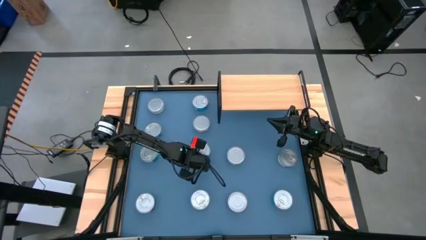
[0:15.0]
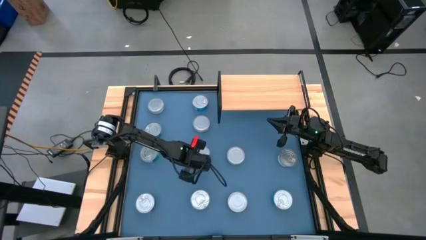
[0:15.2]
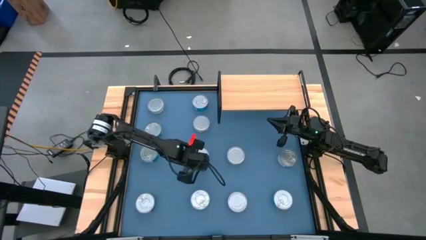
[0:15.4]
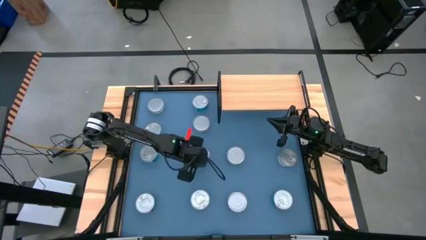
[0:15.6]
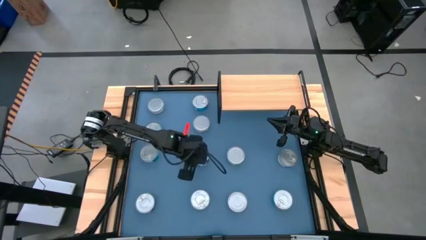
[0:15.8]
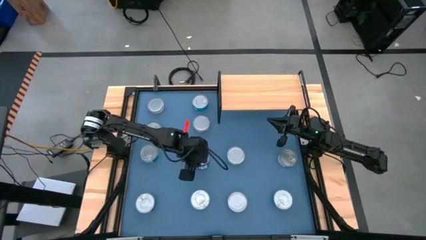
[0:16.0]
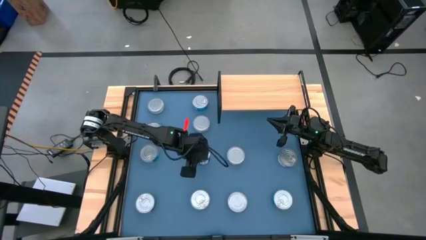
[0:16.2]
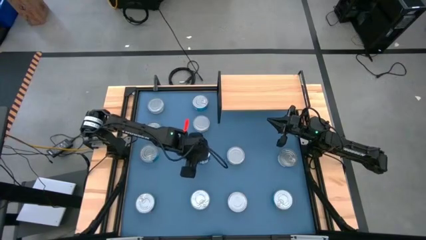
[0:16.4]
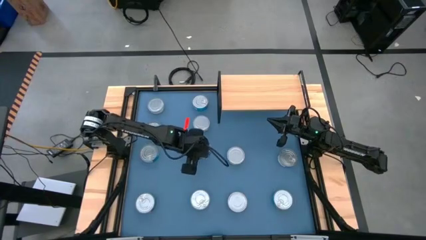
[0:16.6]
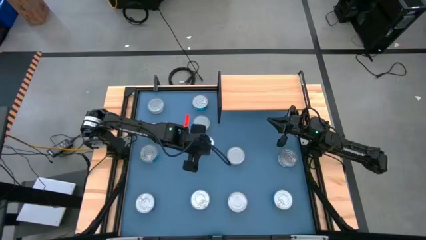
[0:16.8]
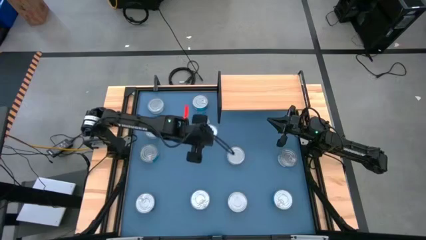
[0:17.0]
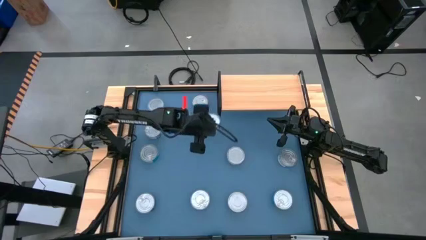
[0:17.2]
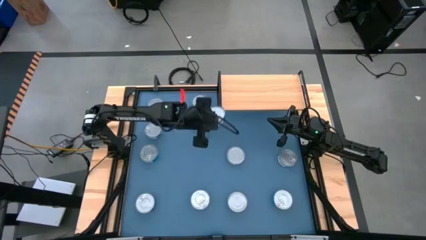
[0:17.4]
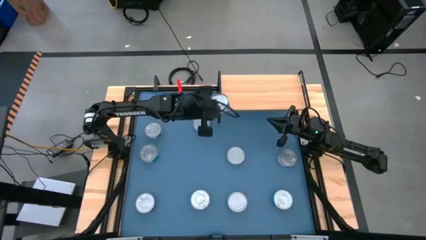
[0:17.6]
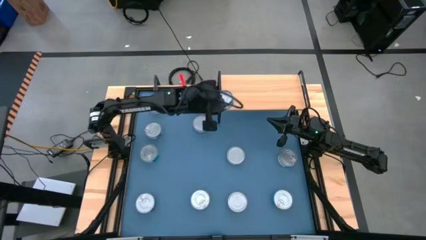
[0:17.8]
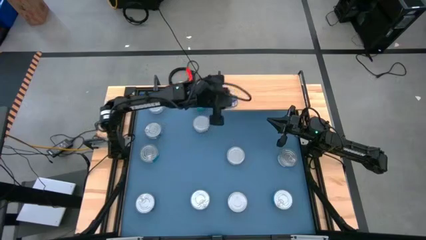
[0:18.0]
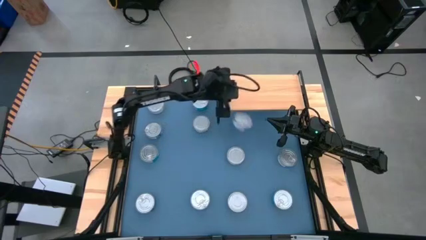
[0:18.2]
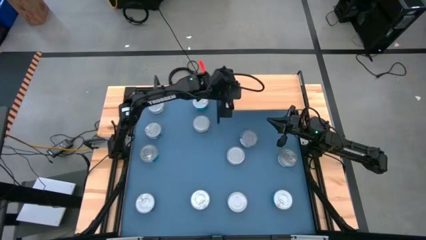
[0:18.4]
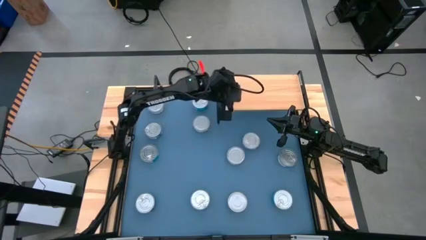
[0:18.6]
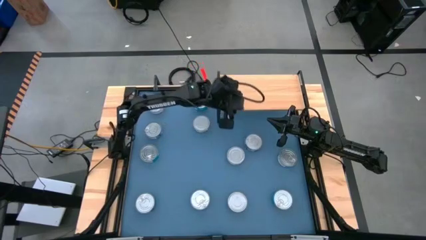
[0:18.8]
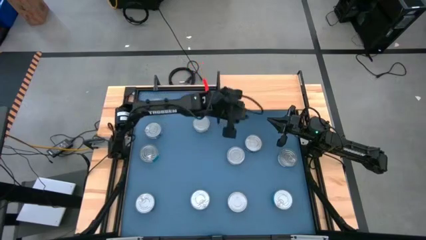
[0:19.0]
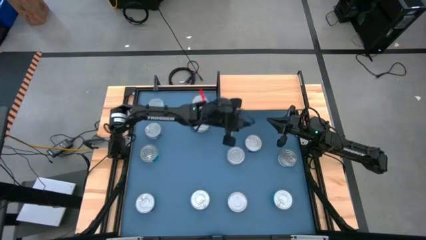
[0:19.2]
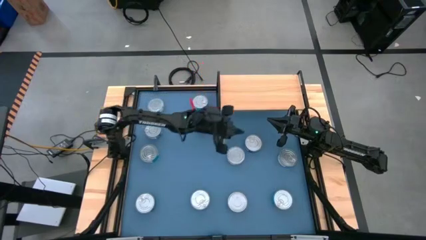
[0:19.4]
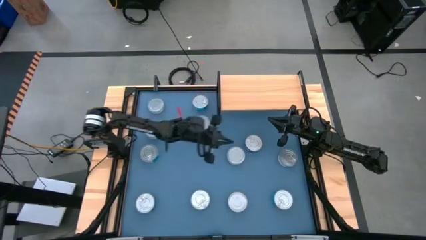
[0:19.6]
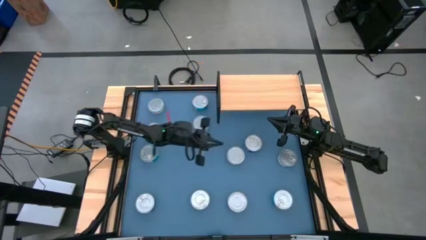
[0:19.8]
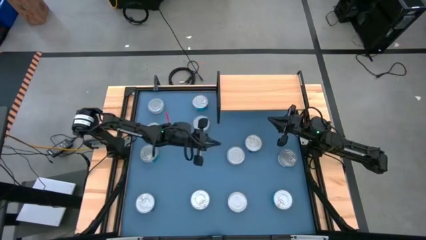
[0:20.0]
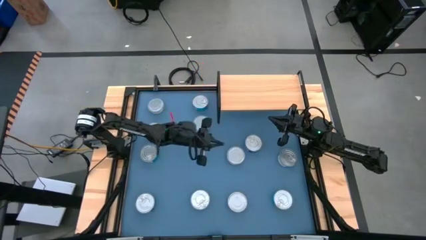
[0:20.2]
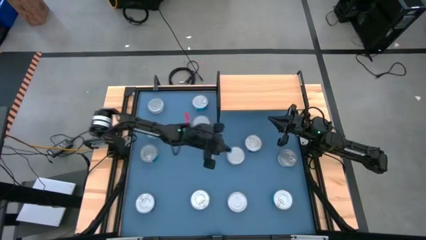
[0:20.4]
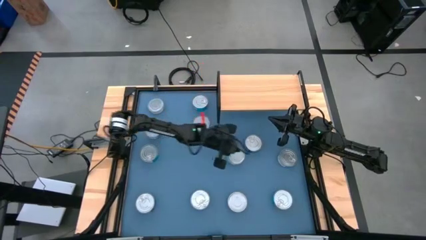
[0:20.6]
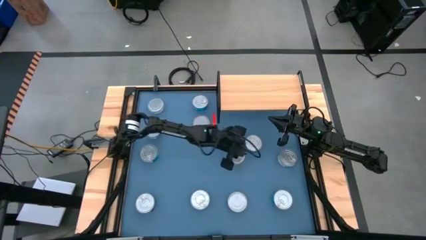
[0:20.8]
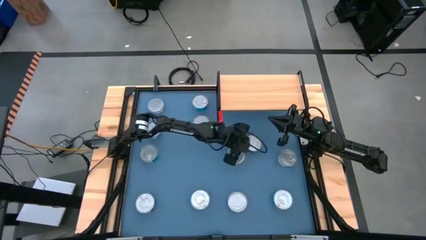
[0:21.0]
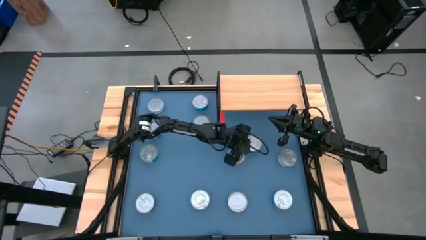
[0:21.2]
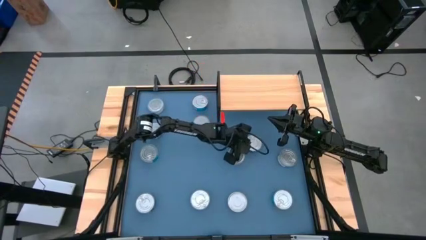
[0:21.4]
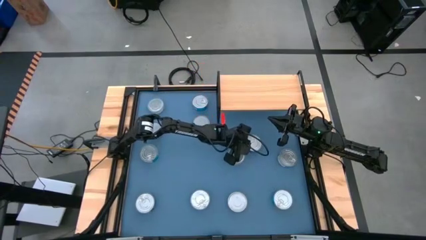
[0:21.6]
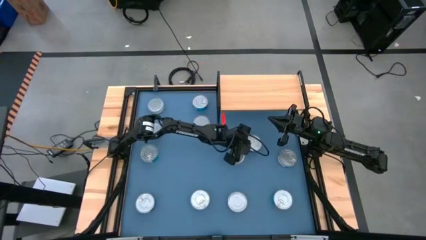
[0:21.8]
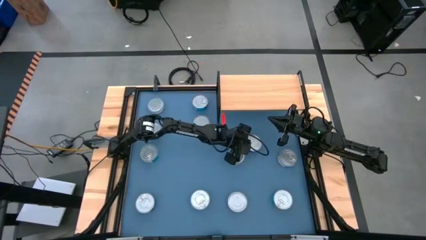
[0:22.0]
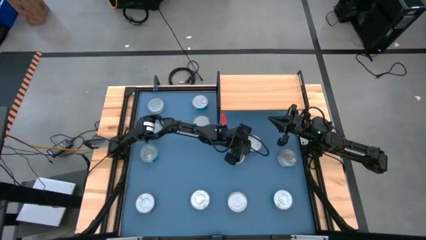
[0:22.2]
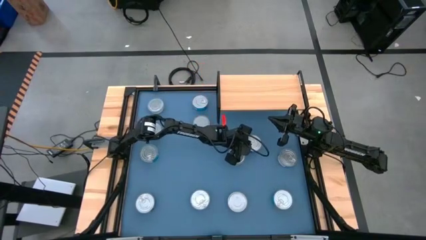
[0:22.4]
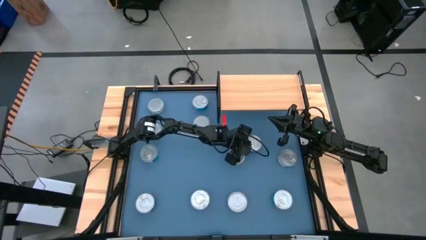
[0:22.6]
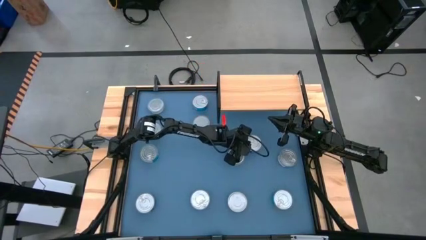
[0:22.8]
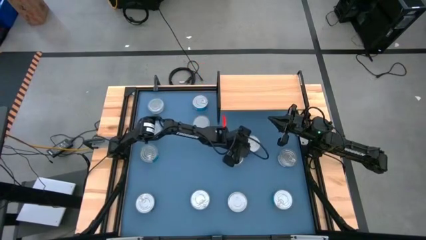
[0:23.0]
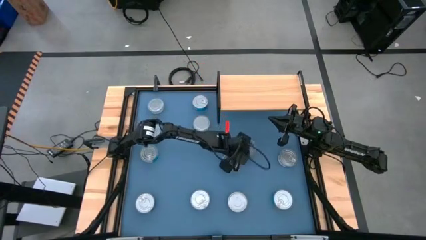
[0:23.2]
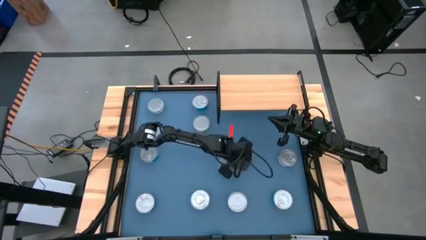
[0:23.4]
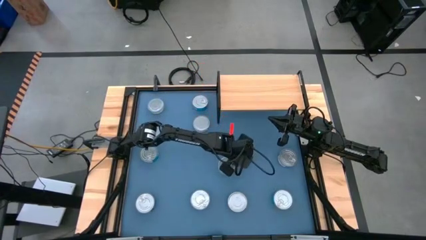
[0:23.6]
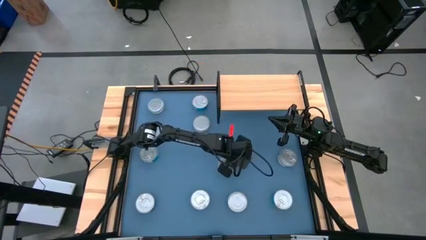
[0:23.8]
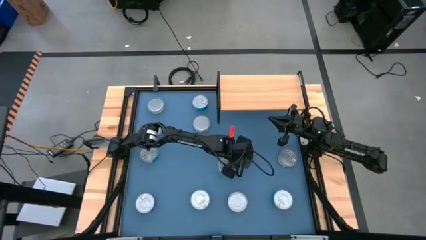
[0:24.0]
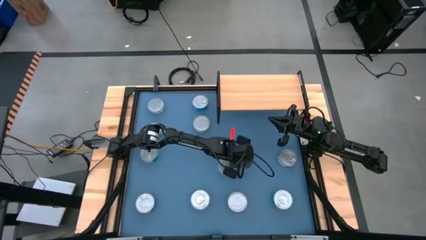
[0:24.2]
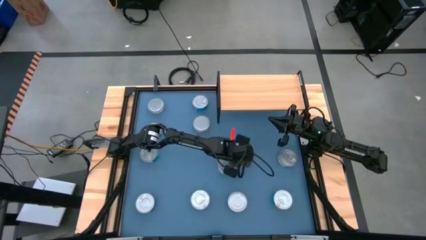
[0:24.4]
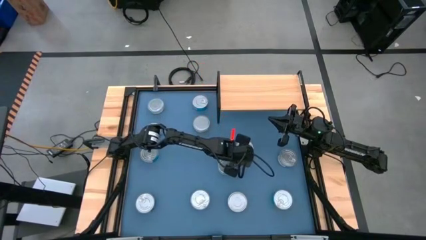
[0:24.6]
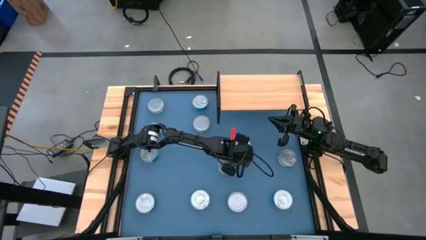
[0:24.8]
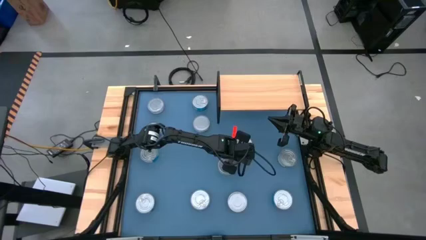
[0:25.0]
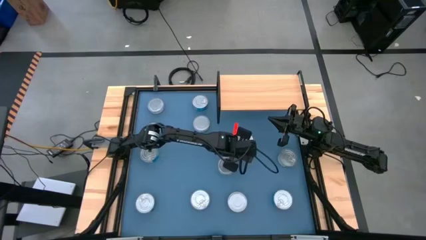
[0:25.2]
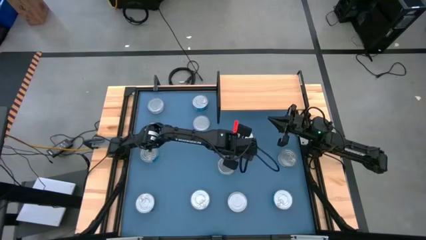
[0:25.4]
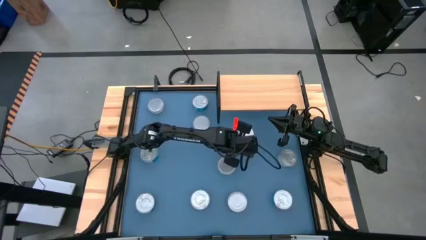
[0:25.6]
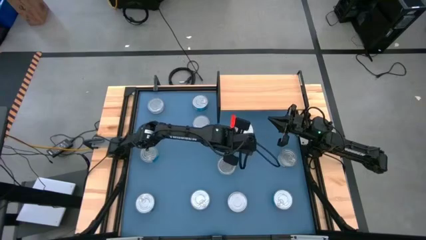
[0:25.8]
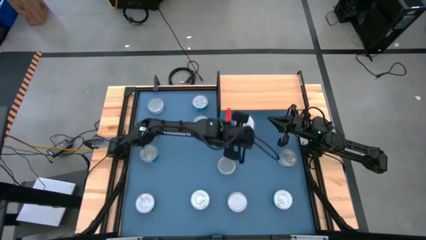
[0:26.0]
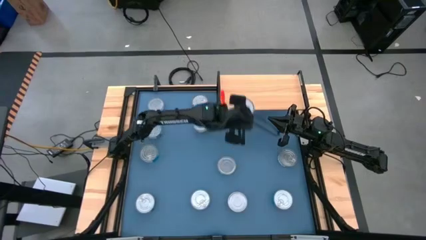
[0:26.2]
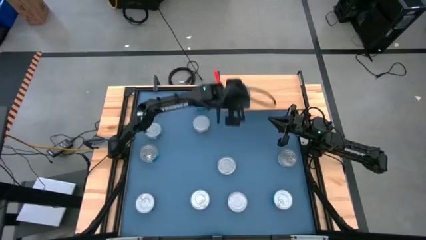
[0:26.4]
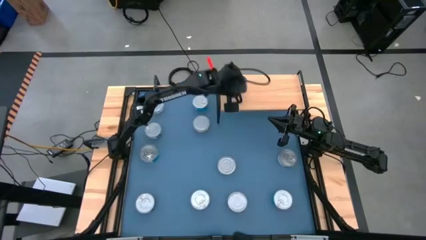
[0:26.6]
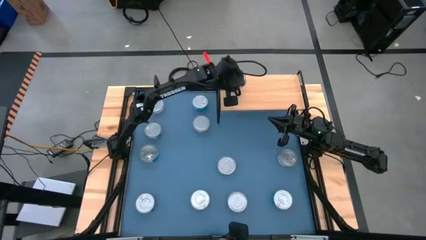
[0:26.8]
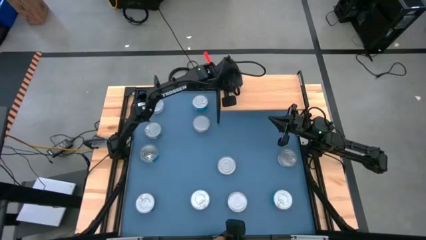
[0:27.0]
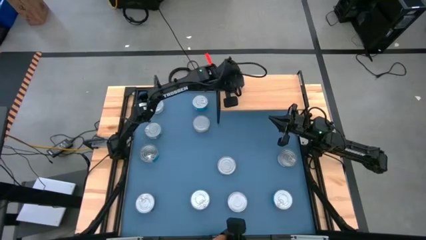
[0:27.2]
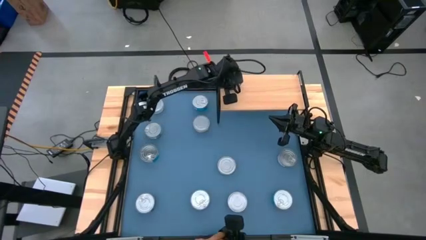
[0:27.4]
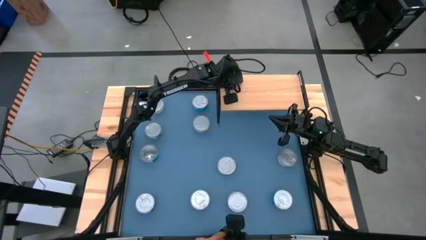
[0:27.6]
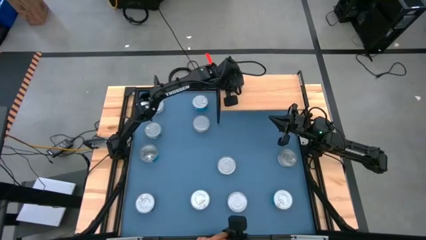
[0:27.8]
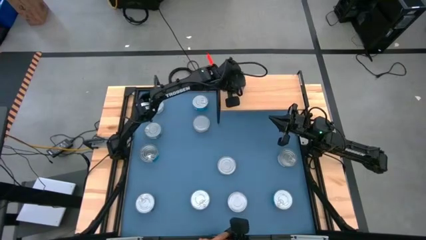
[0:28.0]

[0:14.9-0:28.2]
Task: Stack canned seafood by type on shelf
Put the middle blue tuna can on the shelf
